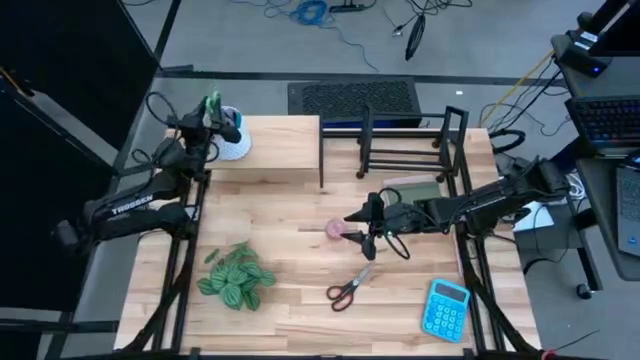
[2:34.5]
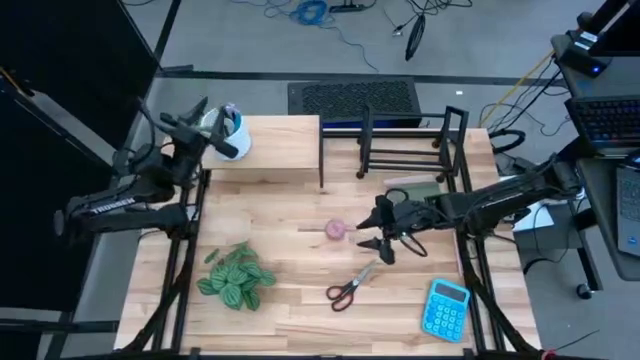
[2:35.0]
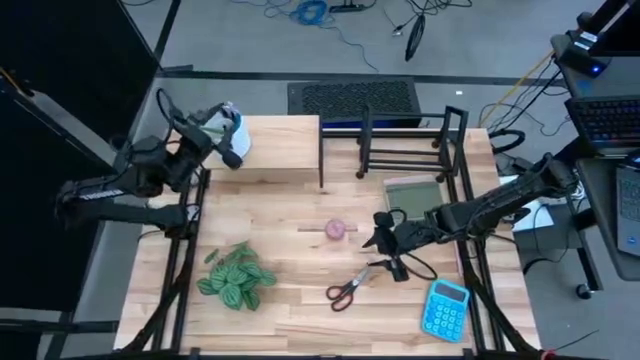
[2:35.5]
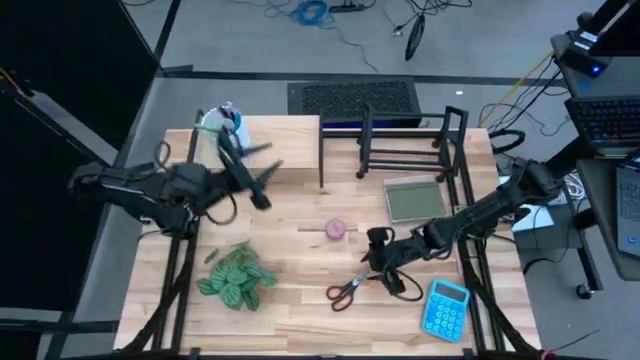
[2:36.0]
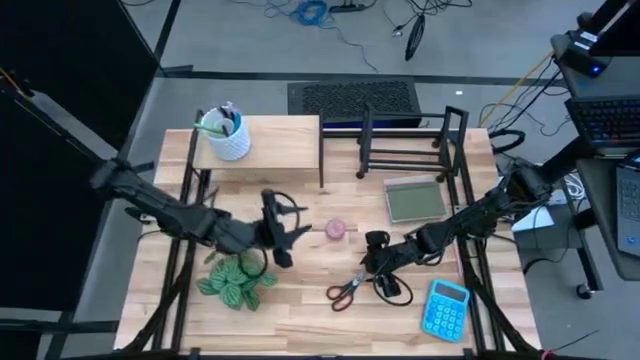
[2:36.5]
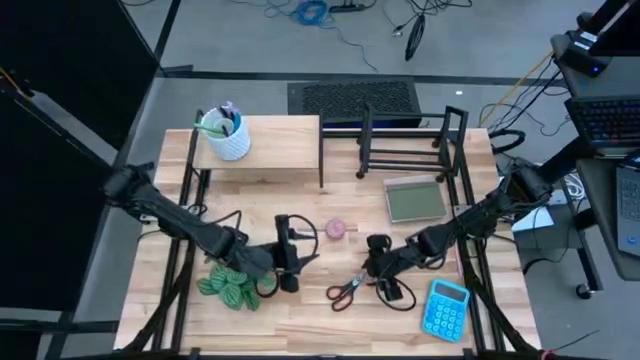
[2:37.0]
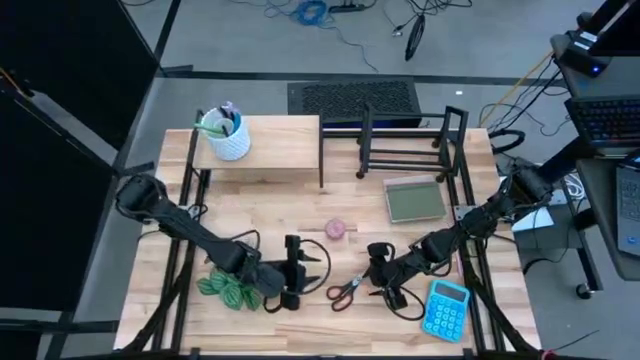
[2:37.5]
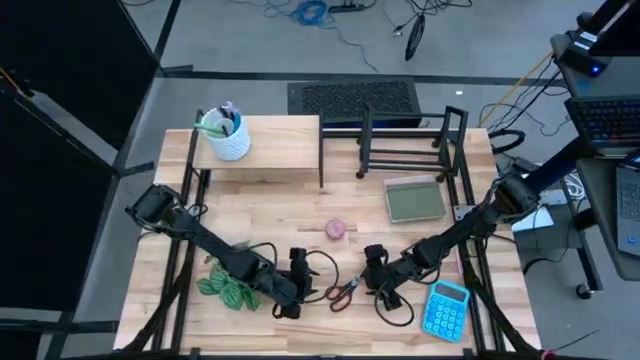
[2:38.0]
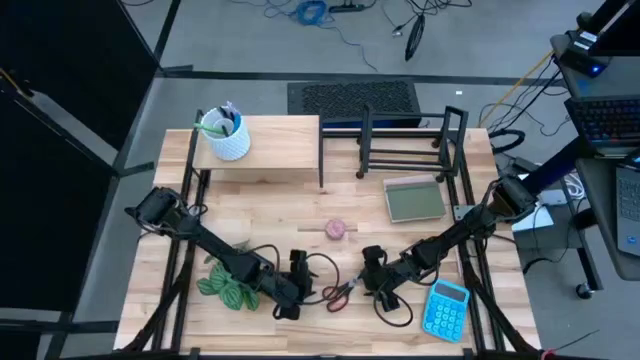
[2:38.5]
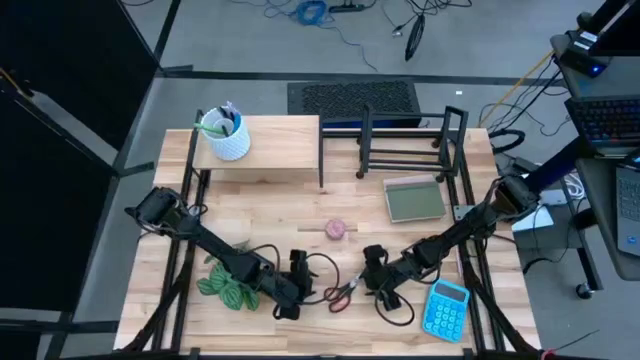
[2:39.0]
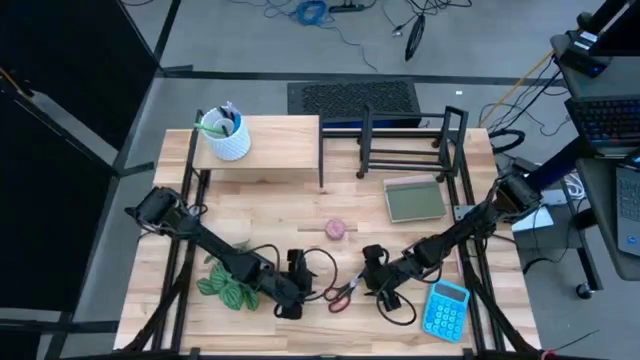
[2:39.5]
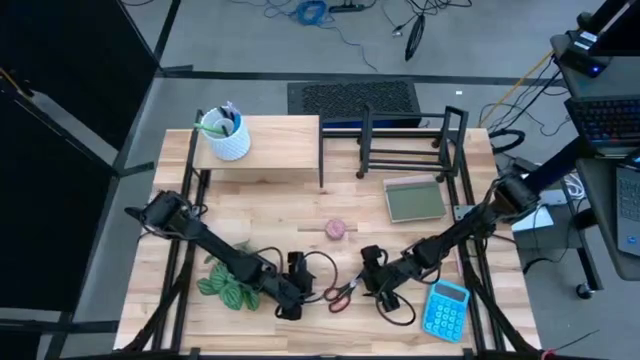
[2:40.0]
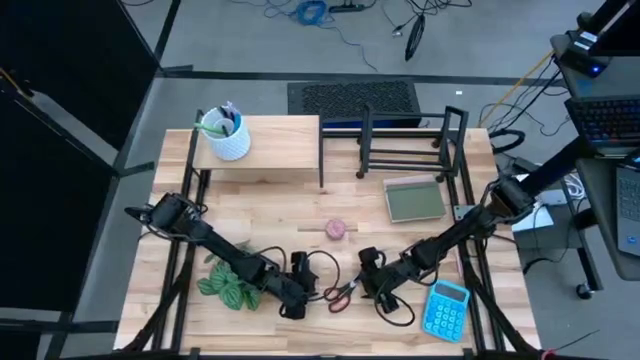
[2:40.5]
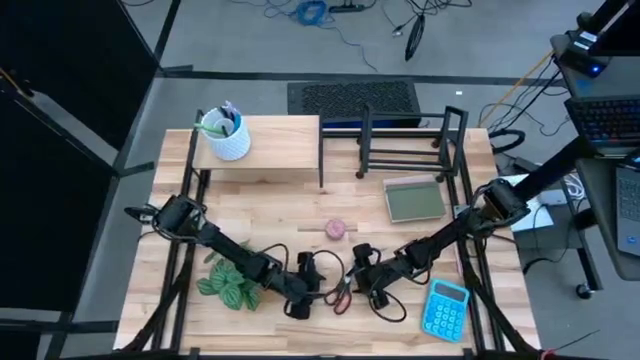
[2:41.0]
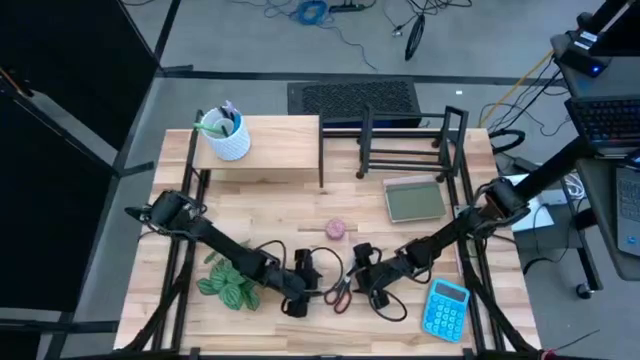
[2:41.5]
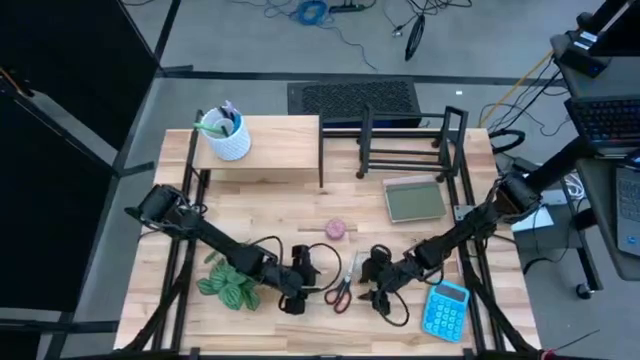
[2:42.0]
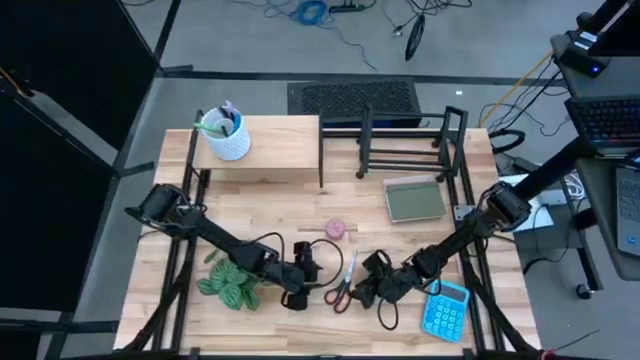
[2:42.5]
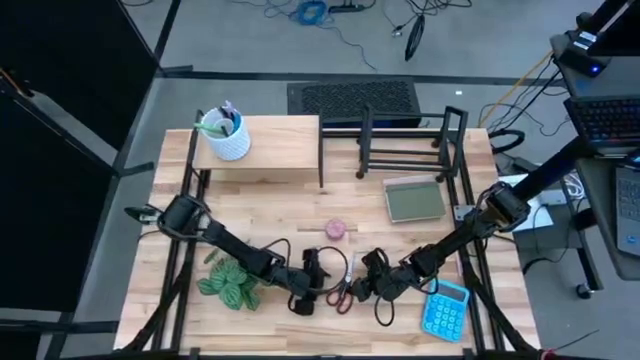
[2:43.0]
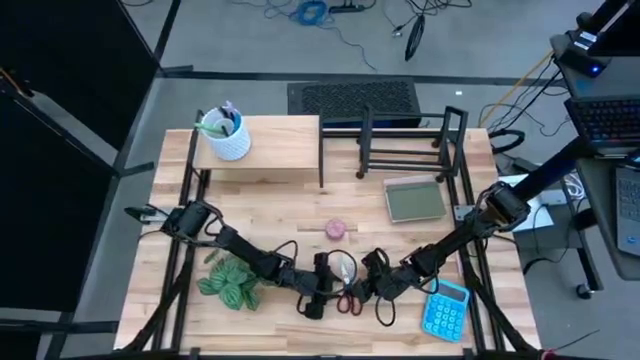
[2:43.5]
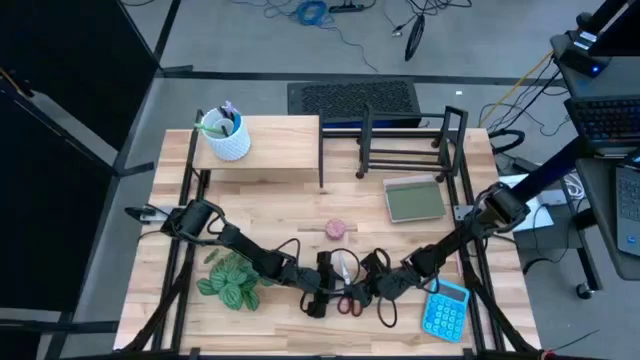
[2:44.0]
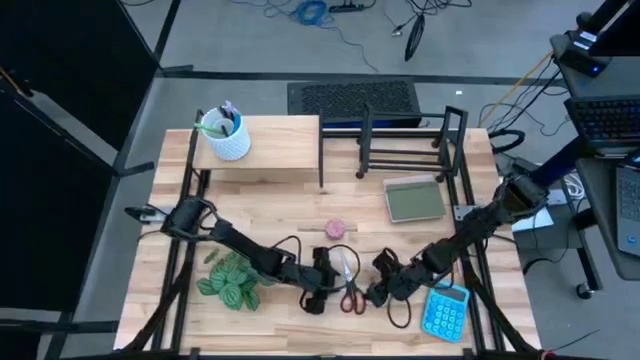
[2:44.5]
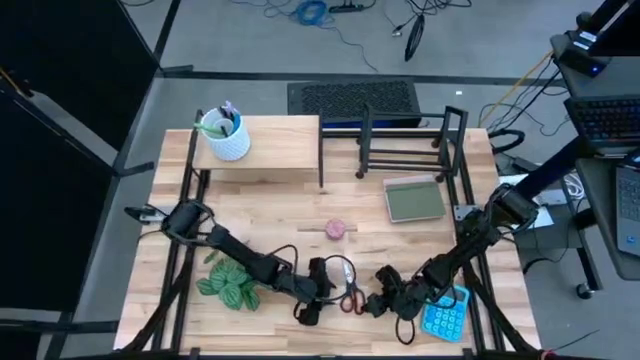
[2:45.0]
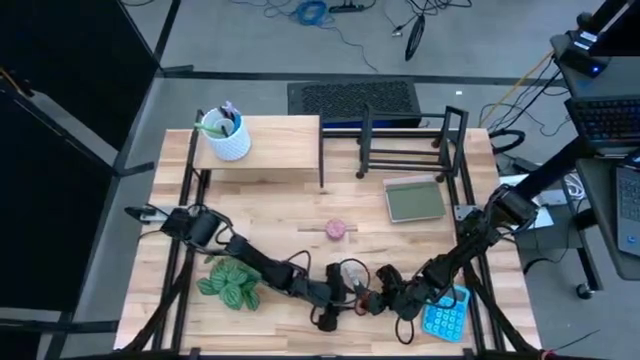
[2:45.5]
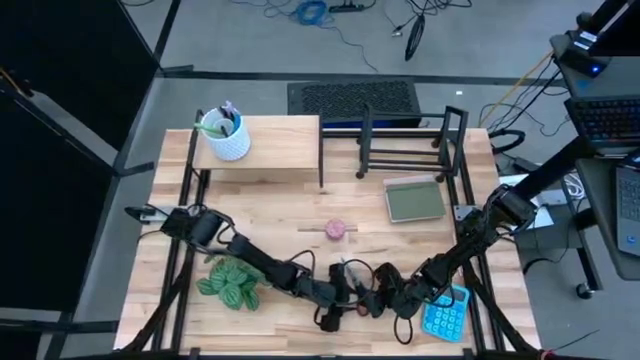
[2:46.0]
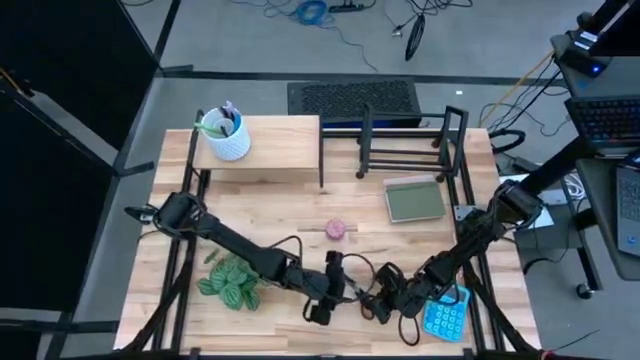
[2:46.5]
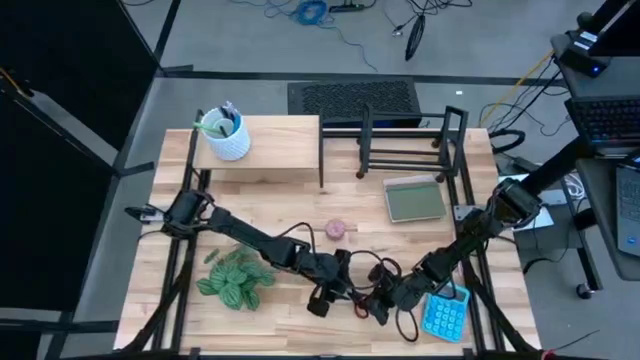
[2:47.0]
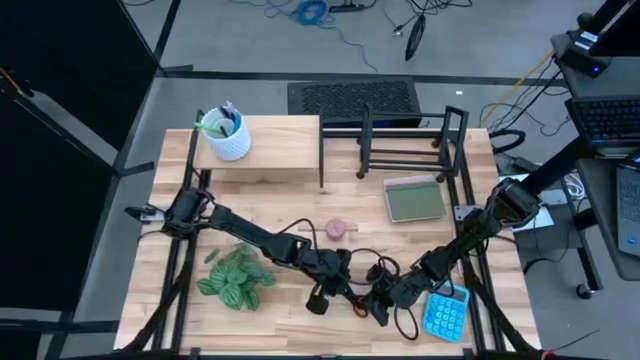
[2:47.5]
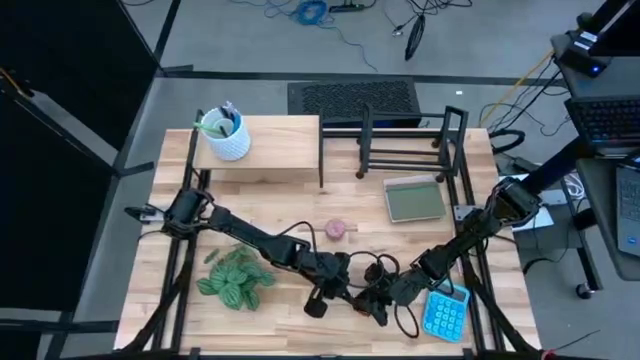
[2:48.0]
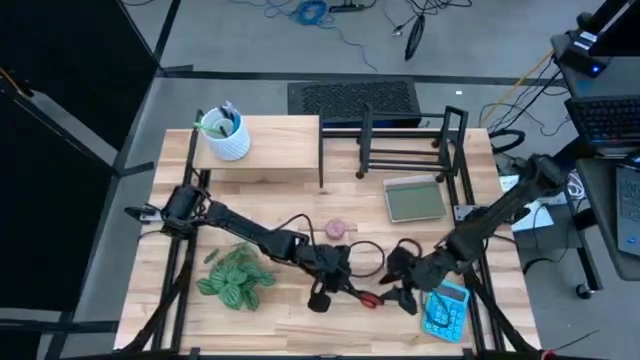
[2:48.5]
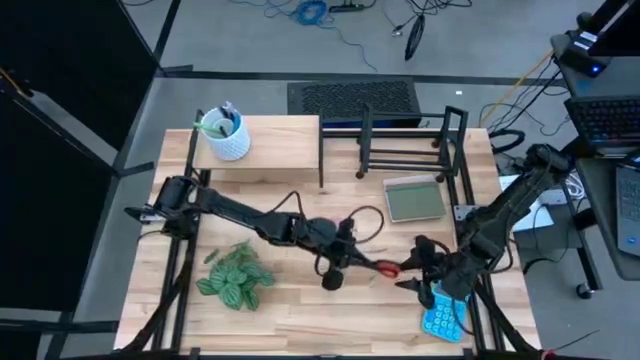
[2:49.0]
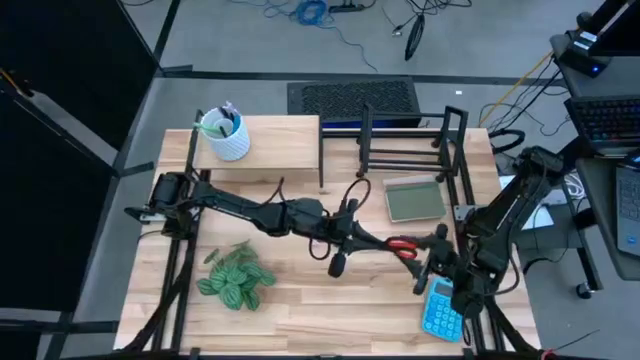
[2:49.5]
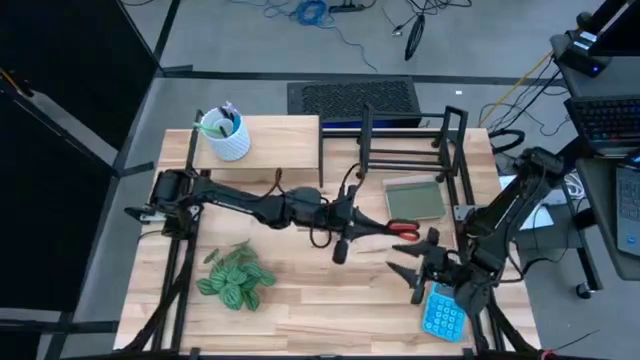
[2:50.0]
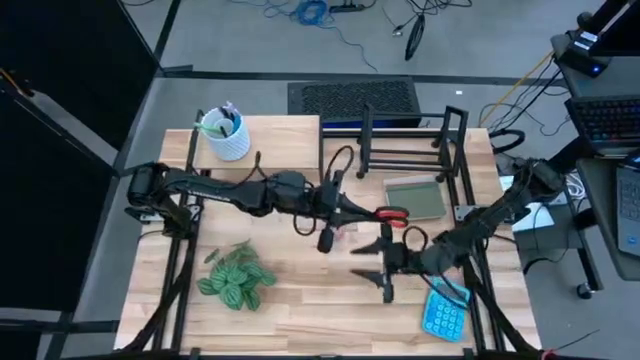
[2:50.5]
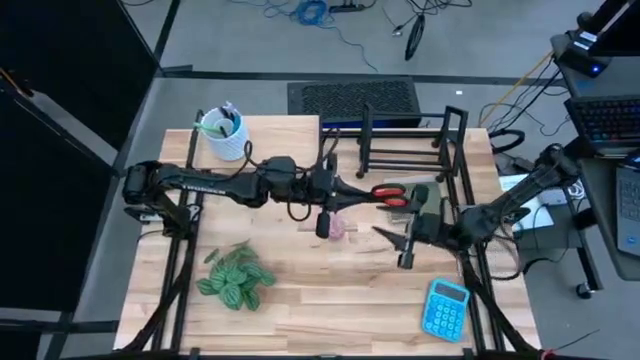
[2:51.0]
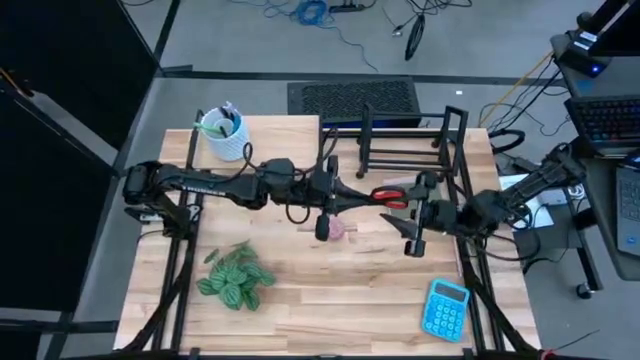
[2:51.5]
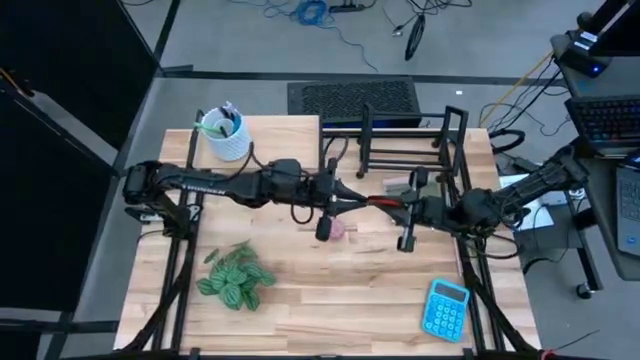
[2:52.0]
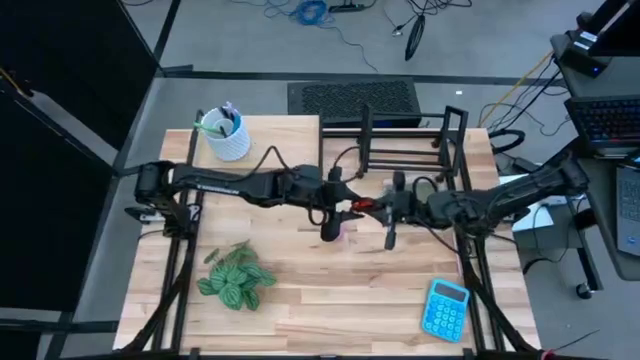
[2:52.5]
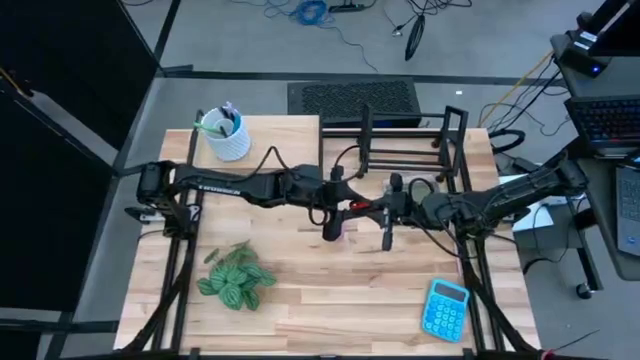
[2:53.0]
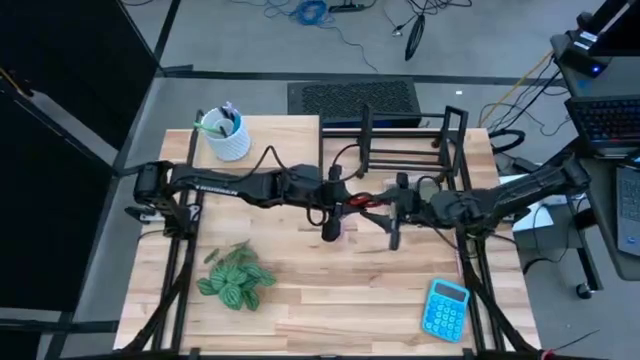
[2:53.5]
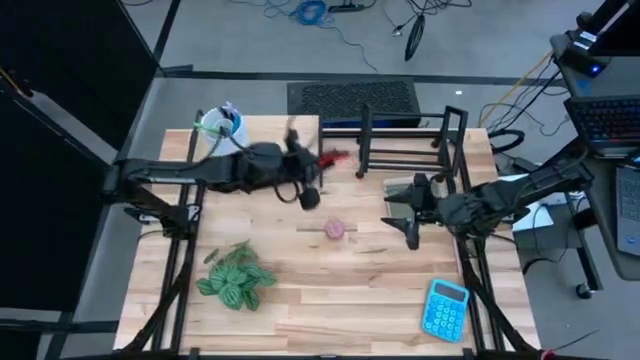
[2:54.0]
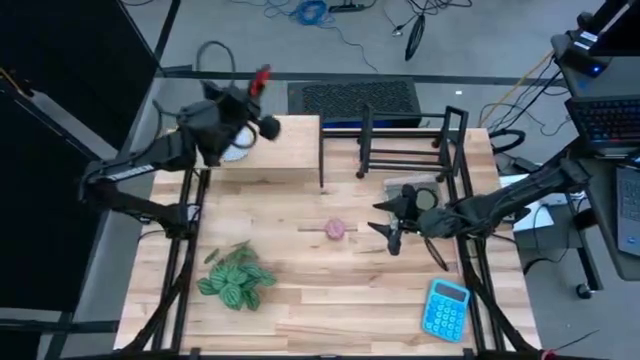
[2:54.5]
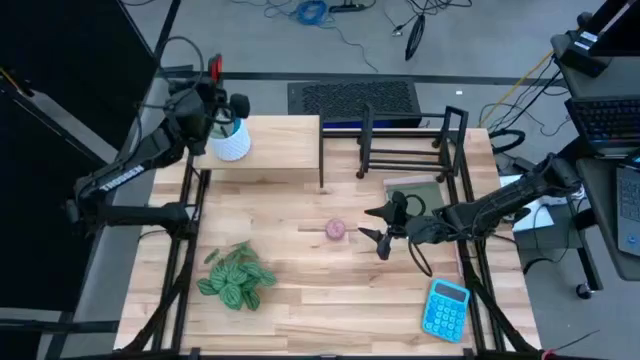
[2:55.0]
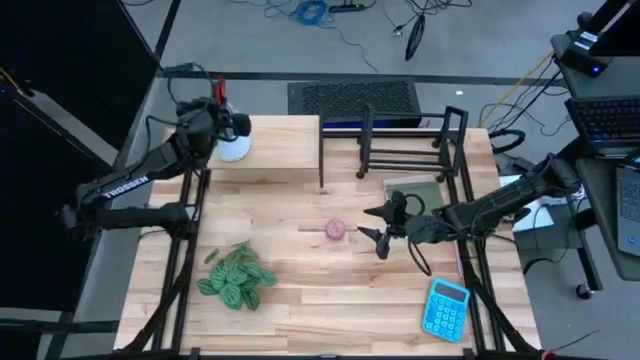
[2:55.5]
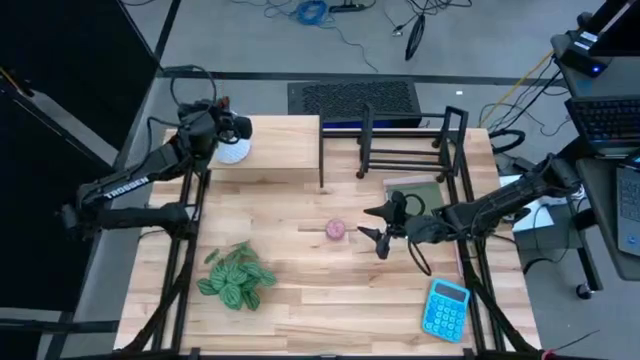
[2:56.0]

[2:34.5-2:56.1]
Task: Stock shelves
Put the black scissors into the white pen holder
